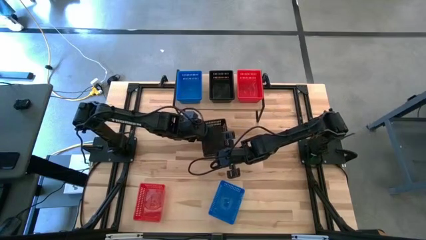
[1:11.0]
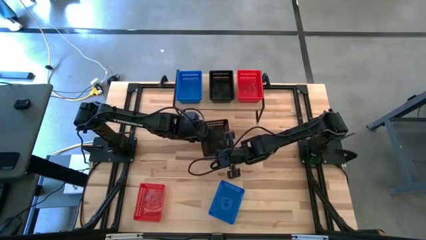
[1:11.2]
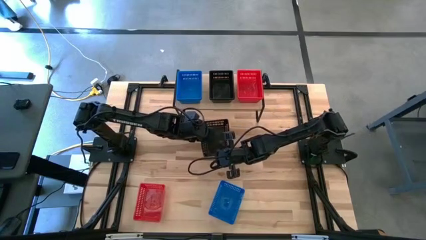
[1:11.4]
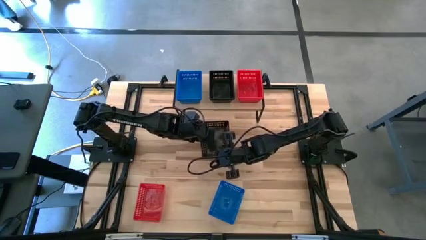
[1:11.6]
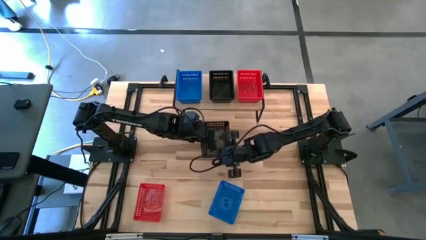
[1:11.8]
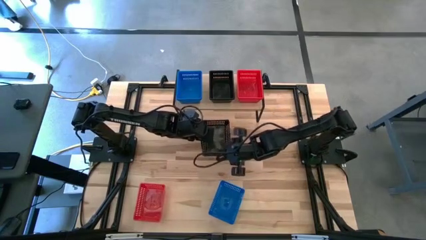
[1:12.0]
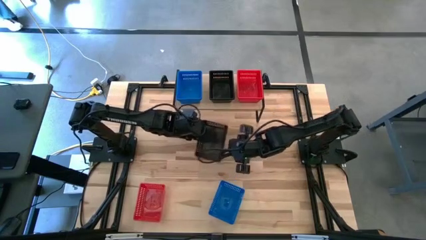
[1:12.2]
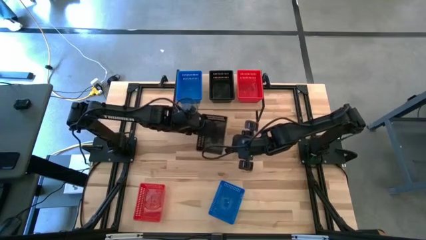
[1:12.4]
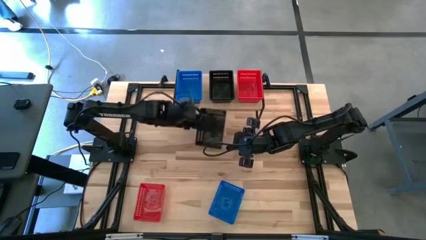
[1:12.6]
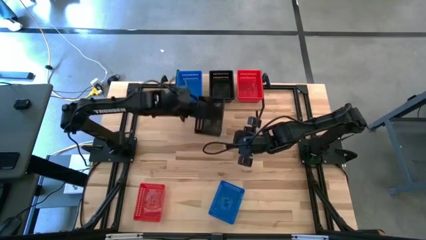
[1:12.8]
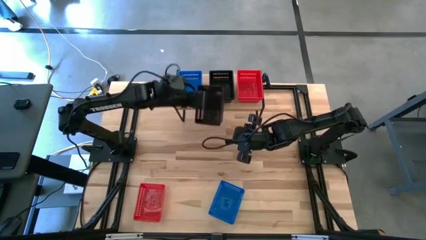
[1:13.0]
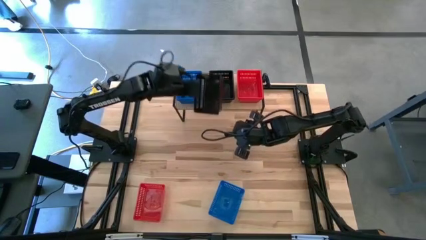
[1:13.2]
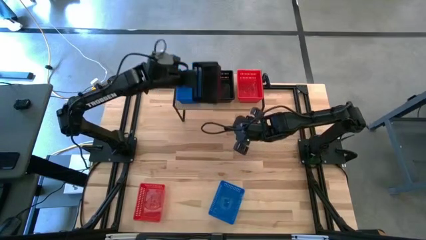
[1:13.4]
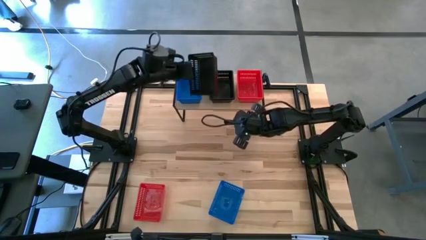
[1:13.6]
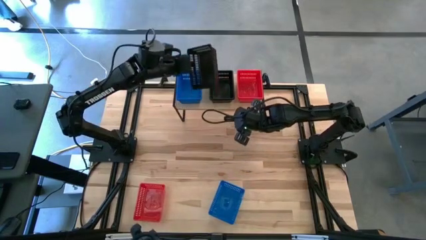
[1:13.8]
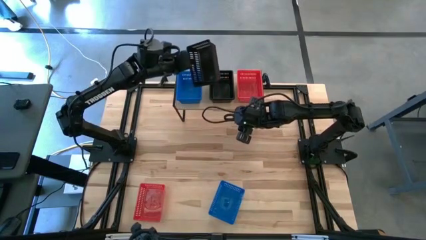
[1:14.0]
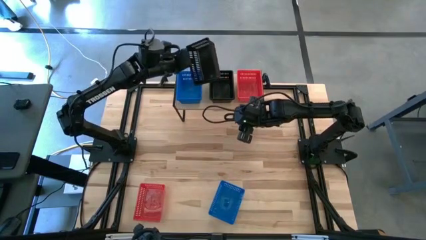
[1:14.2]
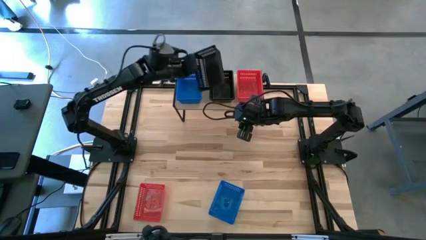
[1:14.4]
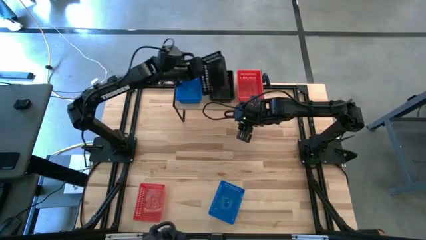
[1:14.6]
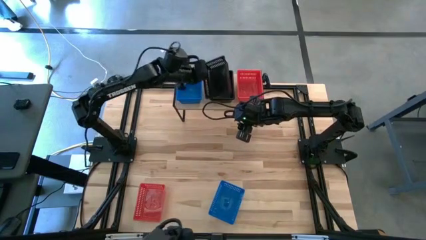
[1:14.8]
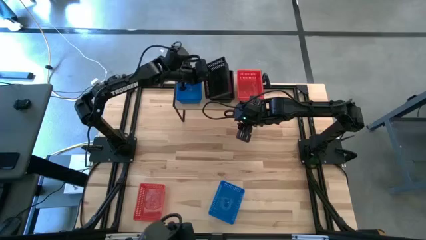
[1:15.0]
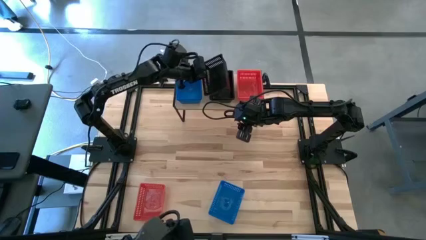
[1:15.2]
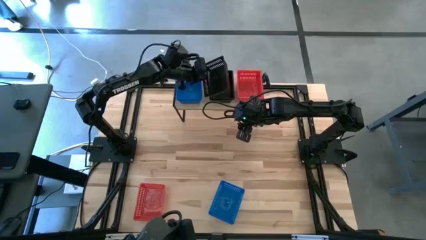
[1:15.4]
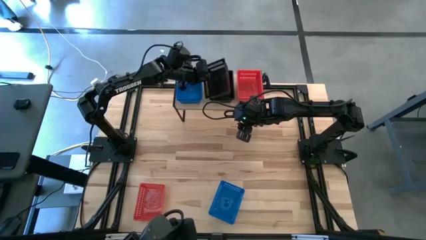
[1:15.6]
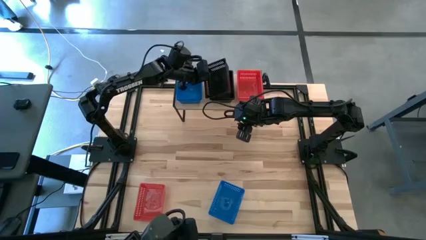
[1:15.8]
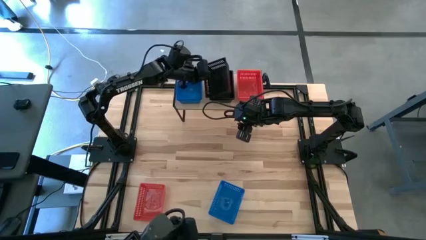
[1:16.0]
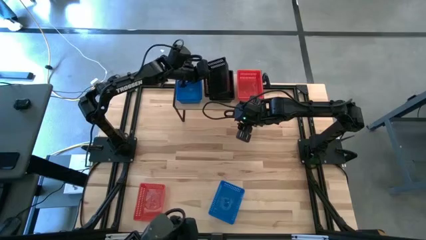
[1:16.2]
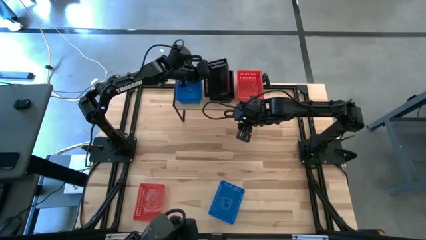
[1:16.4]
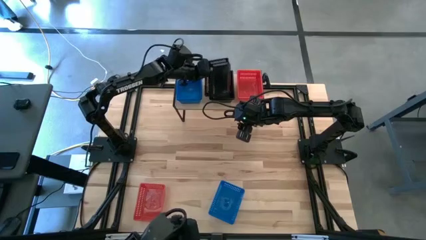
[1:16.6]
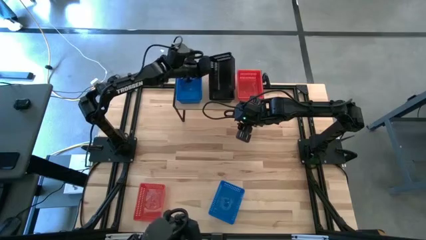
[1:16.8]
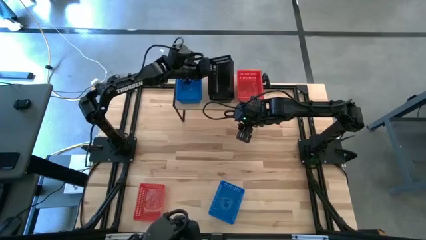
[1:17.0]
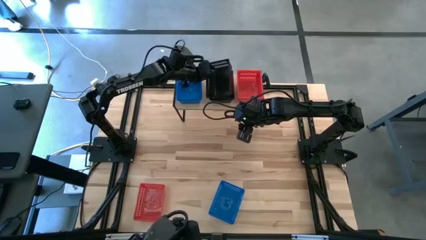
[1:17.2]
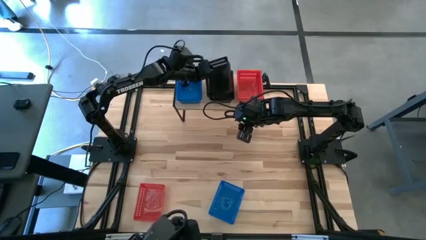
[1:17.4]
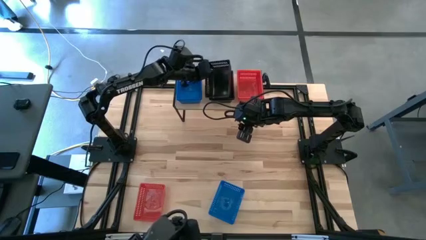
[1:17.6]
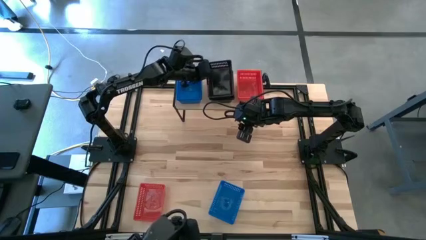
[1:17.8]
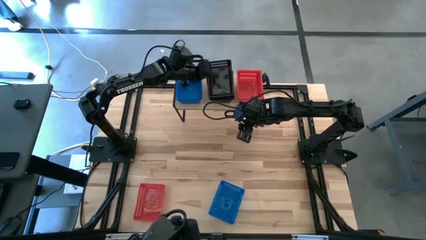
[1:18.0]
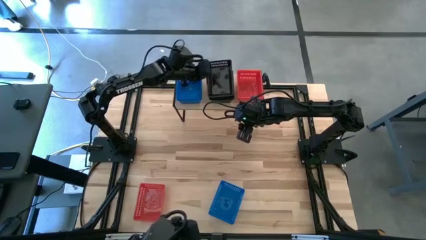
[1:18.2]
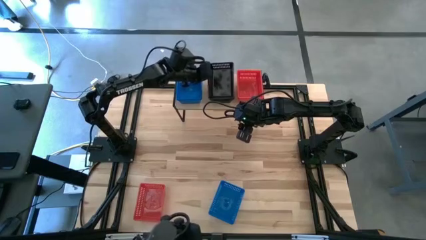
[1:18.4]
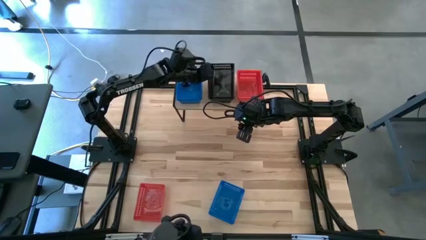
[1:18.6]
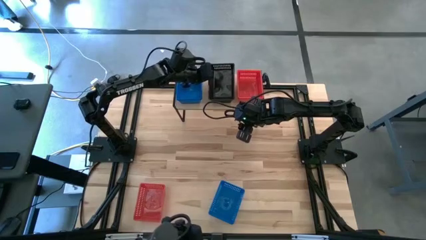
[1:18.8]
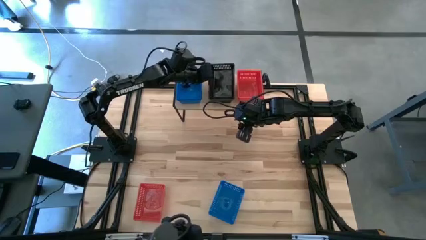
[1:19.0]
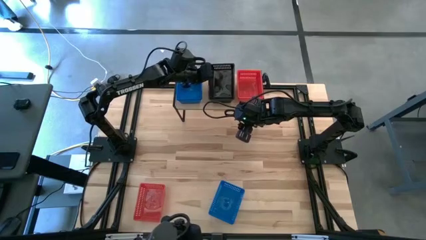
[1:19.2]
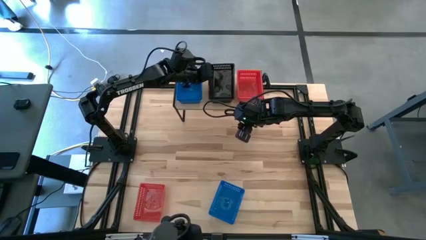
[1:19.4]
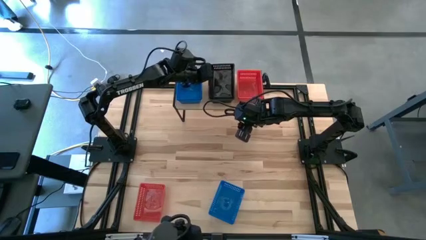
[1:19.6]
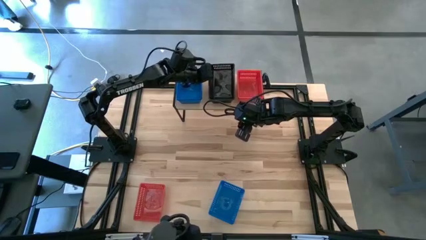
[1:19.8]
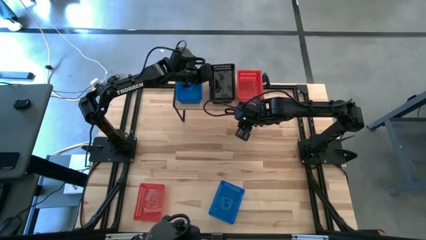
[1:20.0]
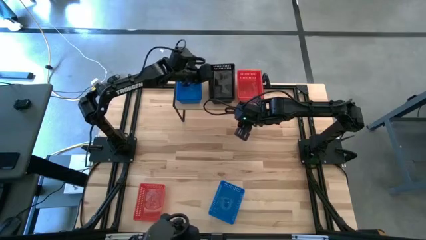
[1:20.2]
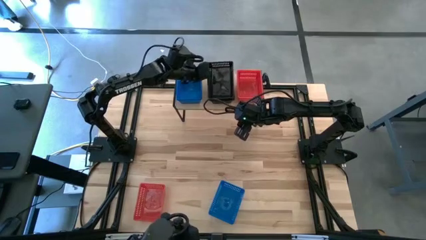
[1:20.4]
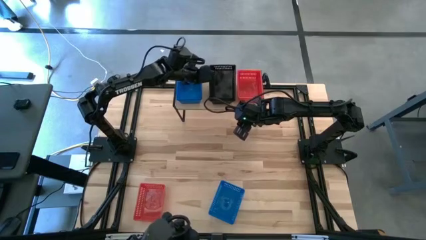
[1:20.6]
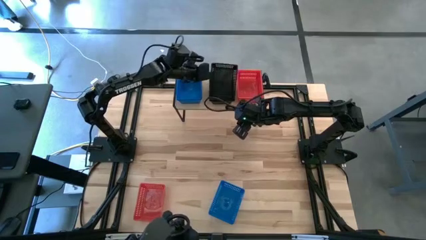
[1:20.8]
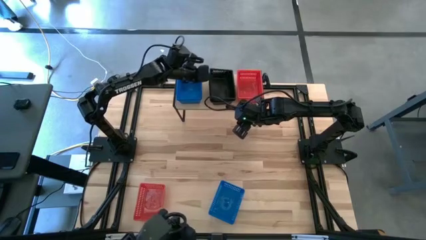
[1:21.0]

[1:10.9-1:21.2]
Task: Stack baskets on shelf by color
Stack the black bin on top of the other black bins on the shelf

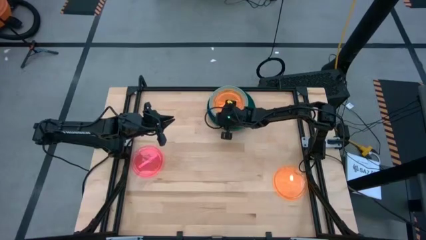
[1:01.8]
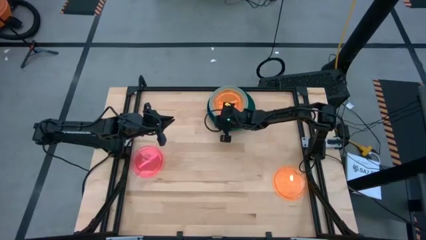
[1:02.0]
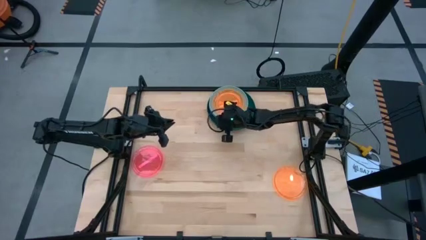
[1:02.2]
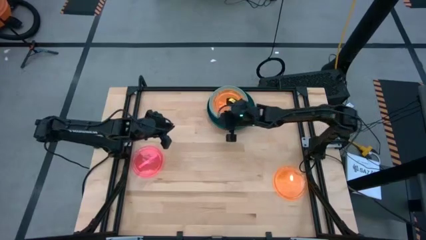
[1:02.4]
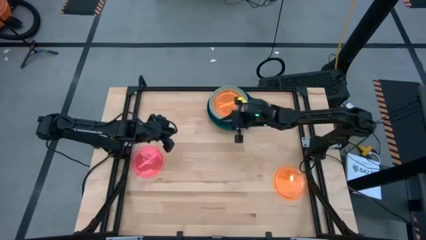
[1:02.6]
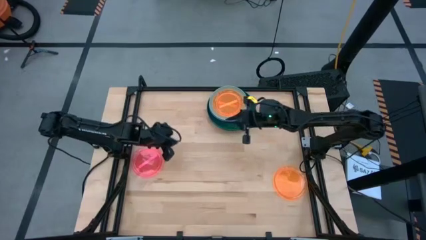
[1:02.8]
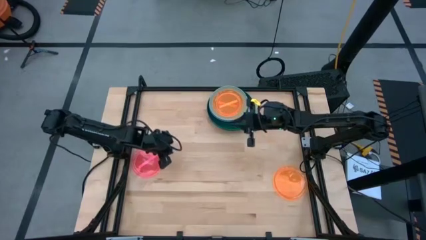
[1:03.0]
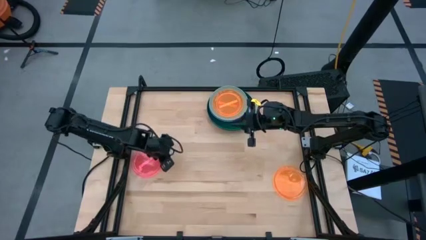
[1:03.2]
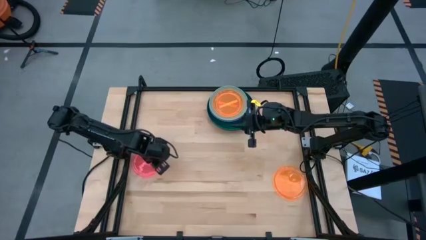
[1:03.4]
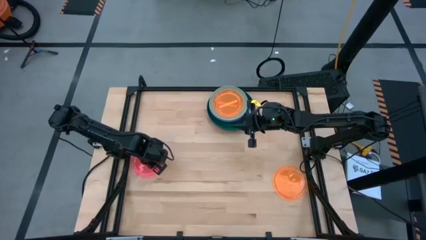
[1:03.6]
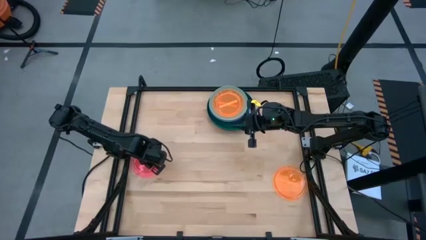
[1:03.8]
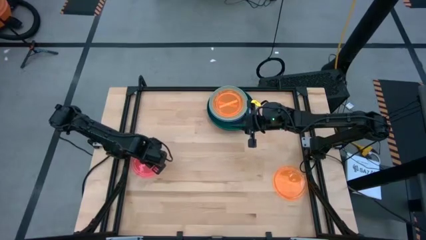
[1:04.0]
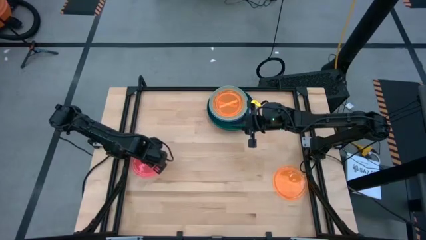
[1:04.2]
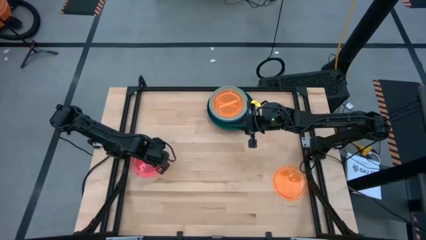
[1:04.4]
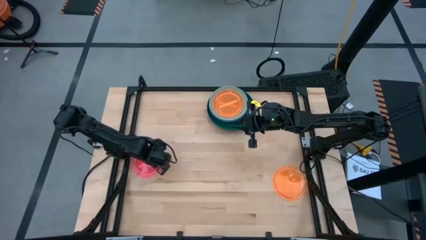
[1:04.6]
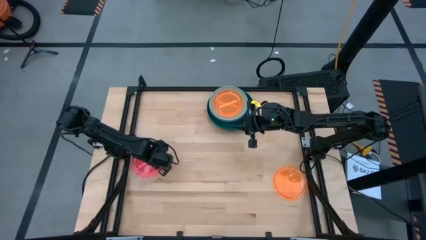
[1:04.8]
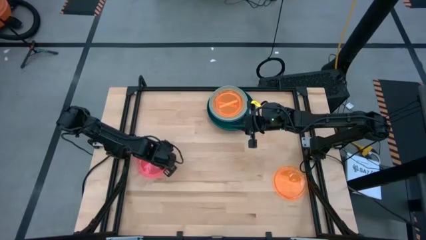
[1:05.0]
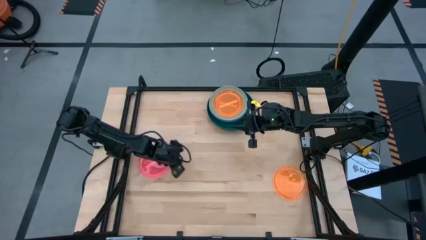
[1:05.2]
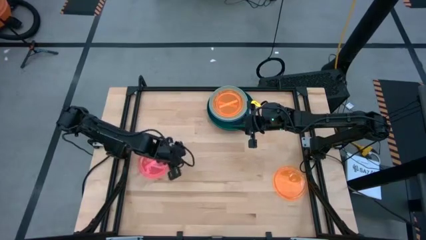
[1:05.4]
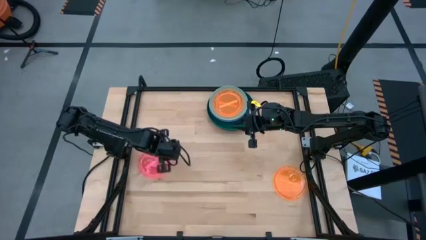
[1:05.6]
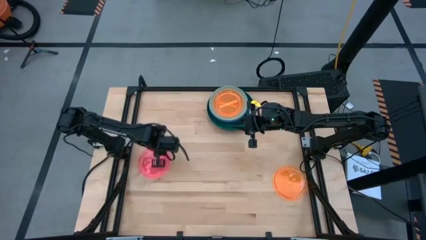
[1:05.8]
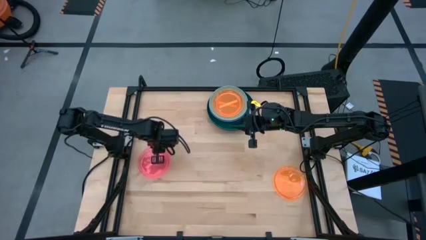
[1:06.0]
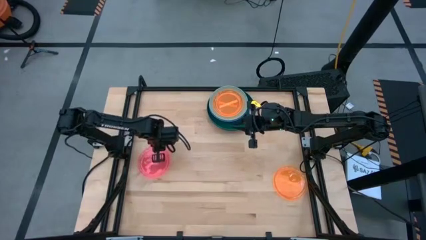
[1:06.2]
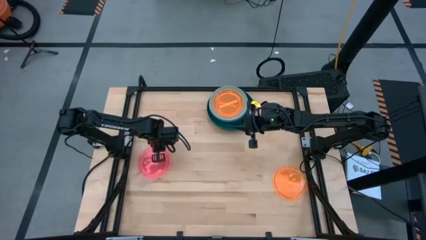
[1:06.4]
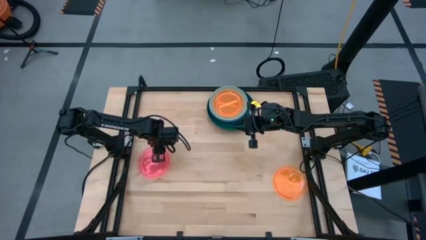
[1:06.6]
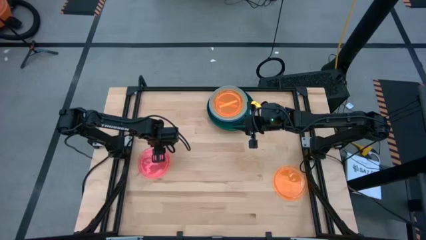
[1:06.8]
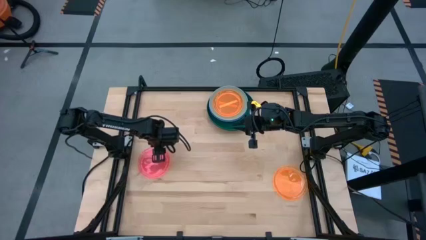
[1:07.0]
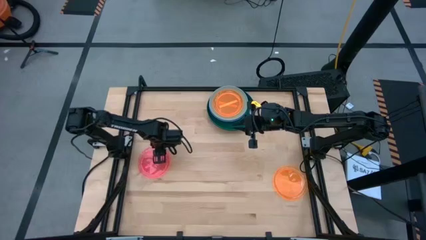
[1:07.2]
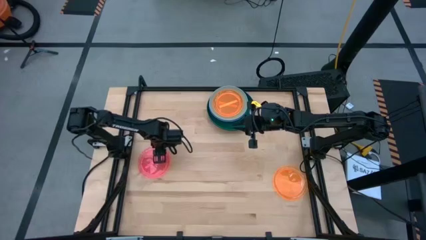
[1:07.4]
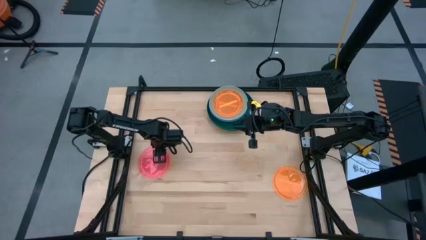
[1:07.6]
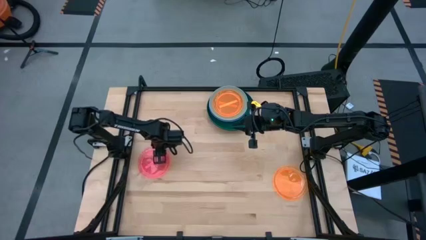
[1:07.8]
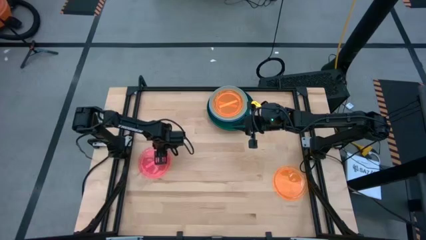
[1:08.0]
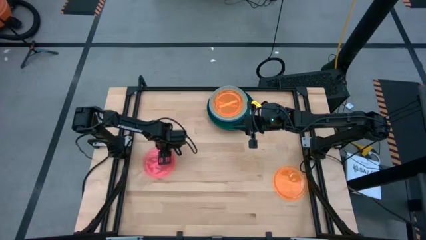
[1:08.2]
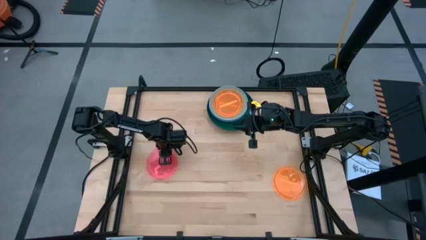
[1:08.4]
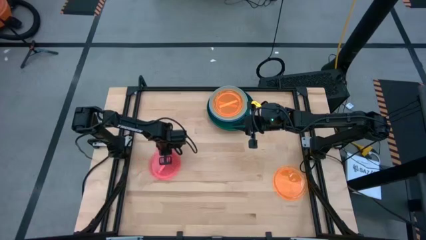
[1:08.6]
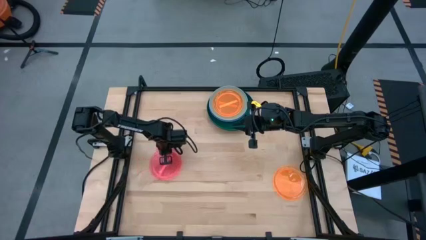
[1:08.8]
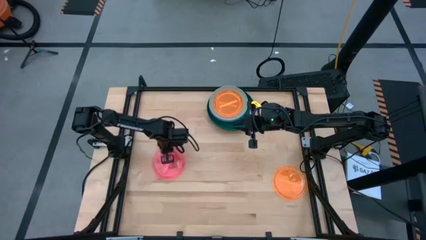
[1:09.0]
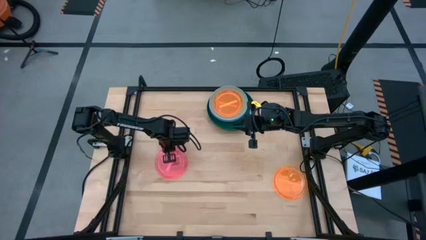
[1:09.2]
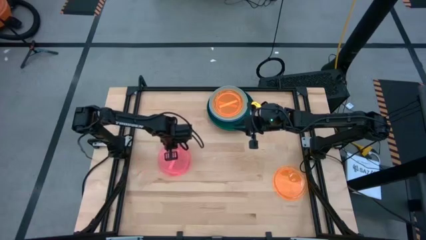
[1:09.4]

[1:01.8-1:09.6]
Task: Stack plastic plates
Stack the pink plate on the top orange plate
